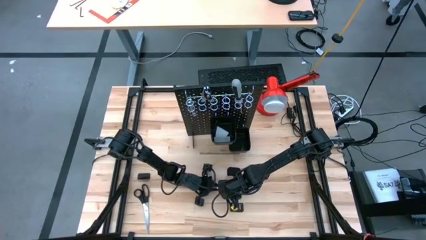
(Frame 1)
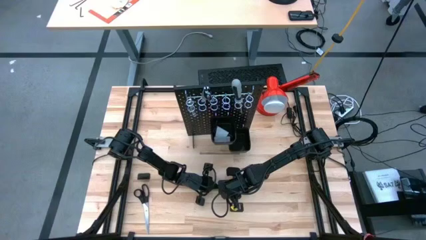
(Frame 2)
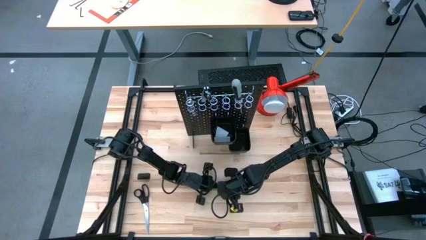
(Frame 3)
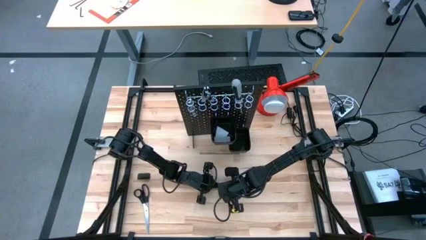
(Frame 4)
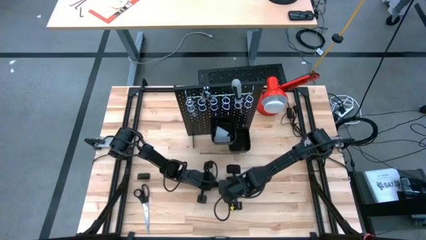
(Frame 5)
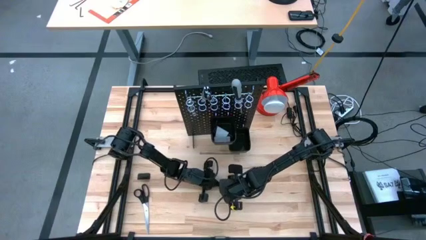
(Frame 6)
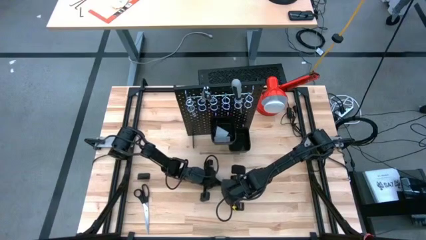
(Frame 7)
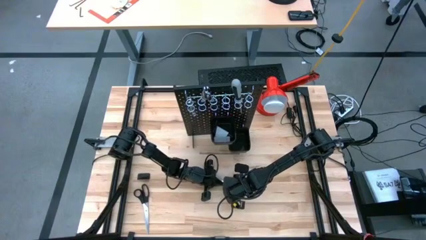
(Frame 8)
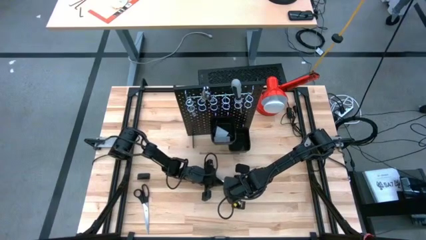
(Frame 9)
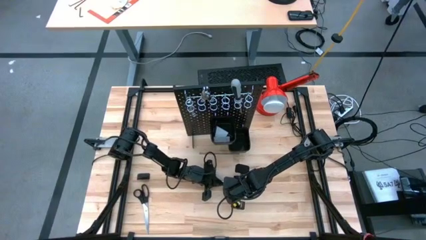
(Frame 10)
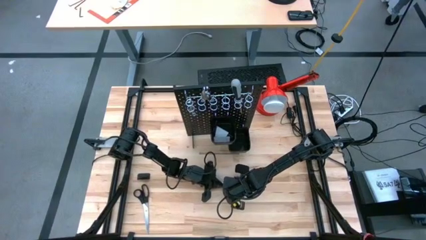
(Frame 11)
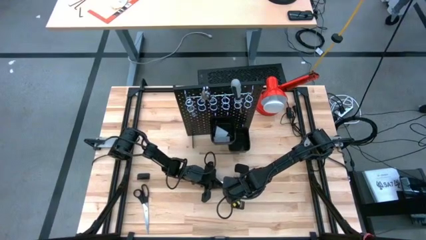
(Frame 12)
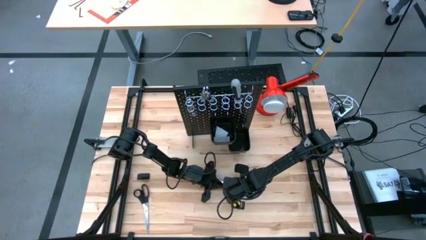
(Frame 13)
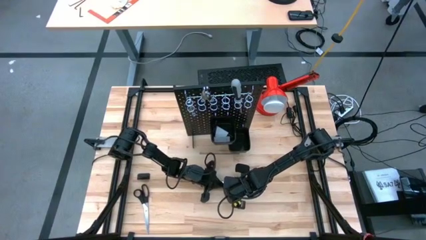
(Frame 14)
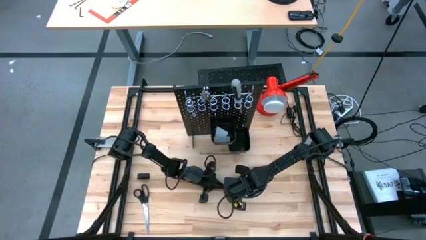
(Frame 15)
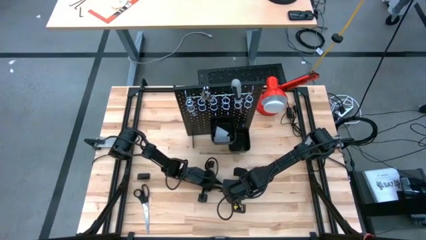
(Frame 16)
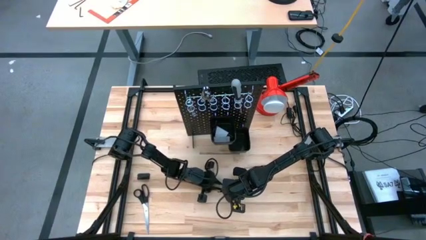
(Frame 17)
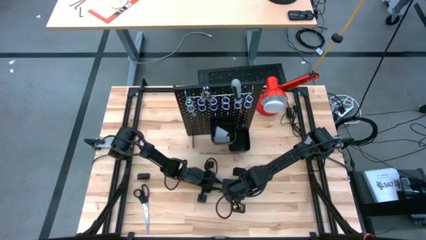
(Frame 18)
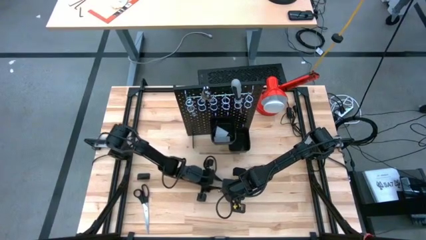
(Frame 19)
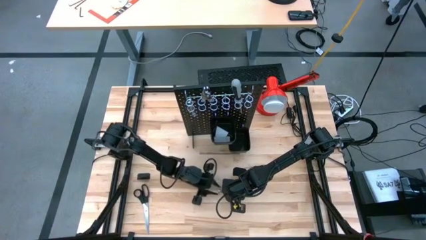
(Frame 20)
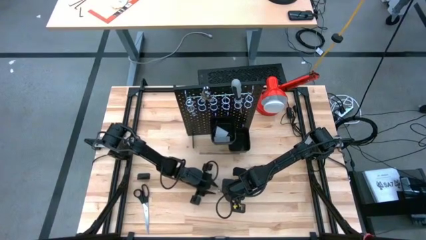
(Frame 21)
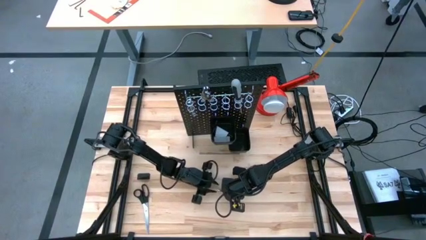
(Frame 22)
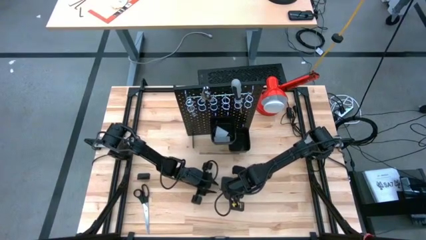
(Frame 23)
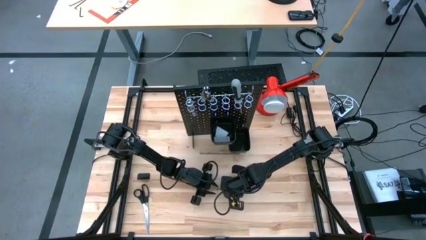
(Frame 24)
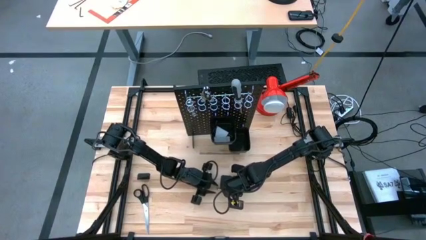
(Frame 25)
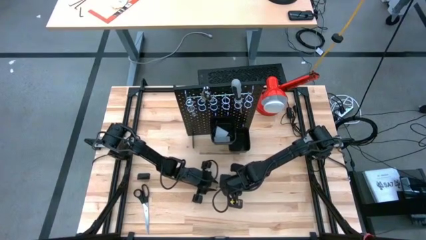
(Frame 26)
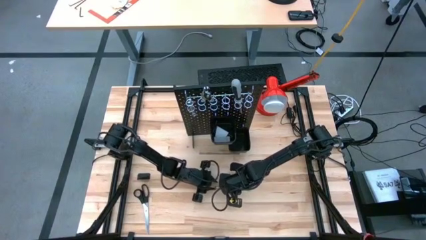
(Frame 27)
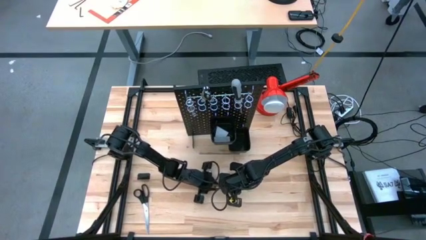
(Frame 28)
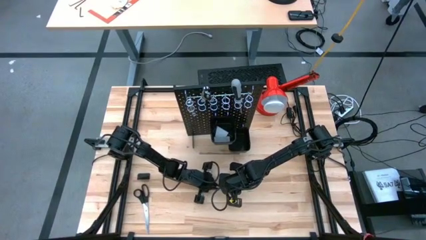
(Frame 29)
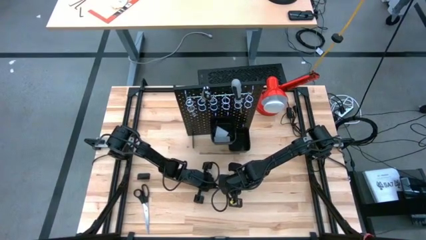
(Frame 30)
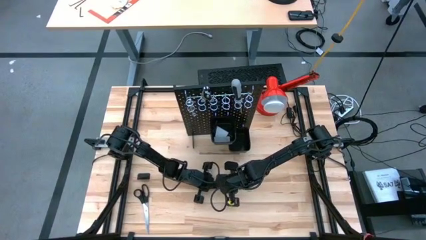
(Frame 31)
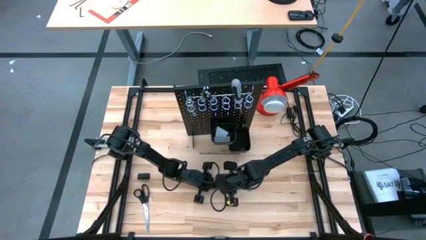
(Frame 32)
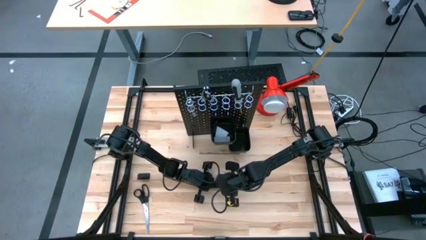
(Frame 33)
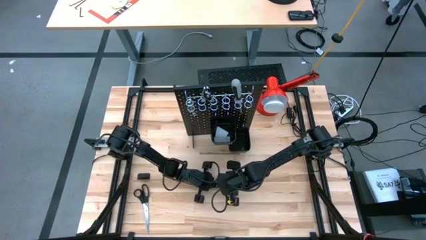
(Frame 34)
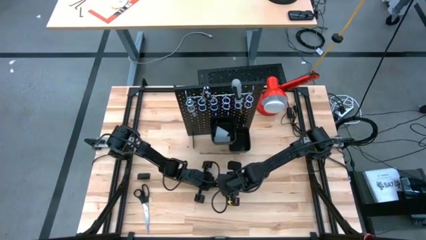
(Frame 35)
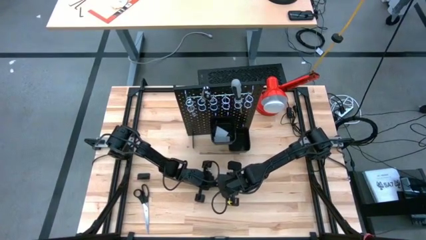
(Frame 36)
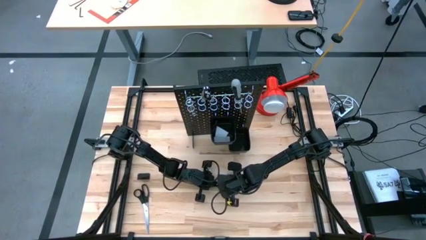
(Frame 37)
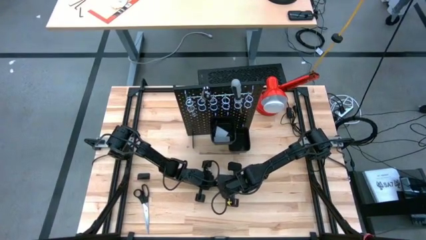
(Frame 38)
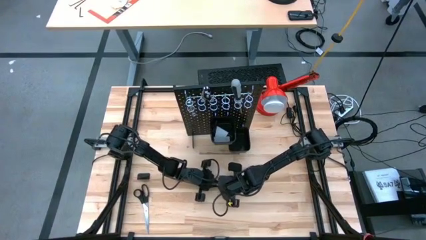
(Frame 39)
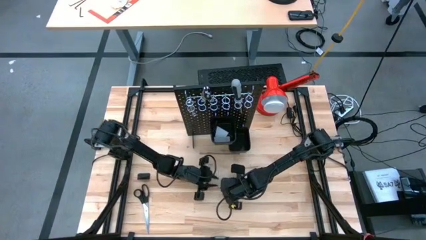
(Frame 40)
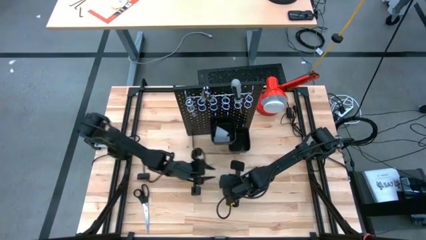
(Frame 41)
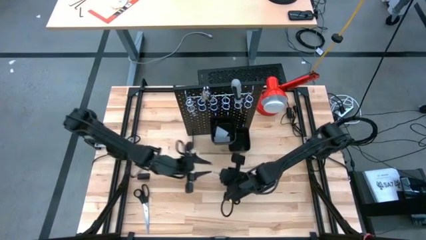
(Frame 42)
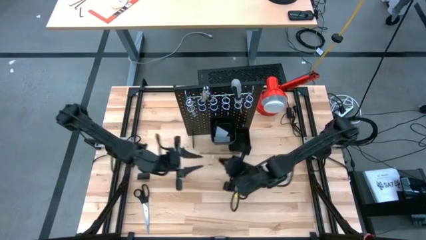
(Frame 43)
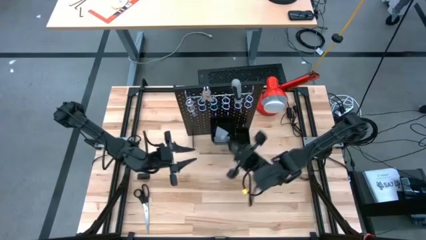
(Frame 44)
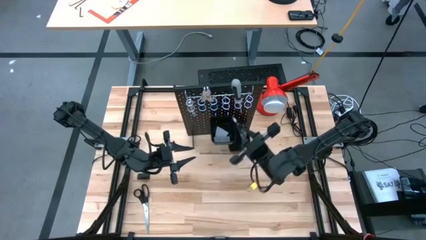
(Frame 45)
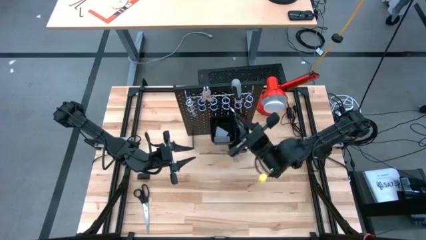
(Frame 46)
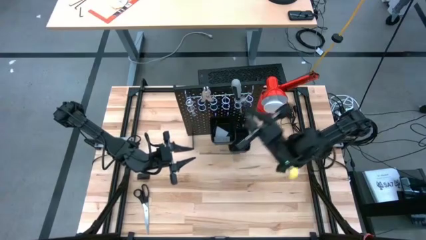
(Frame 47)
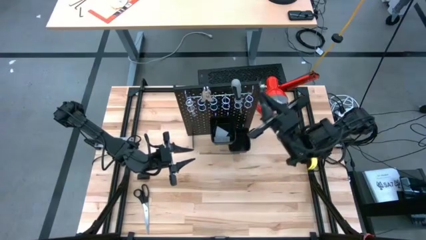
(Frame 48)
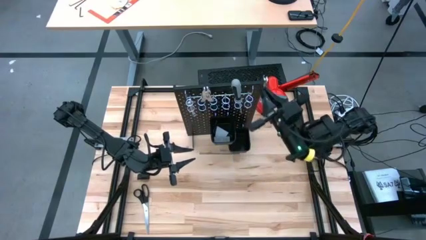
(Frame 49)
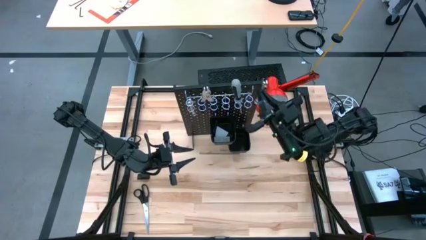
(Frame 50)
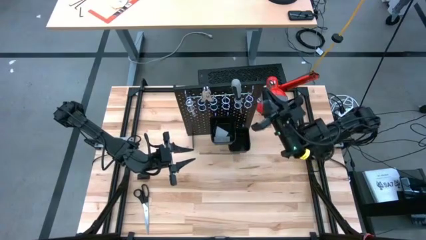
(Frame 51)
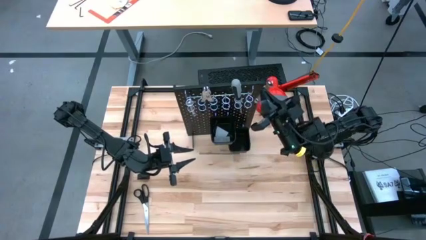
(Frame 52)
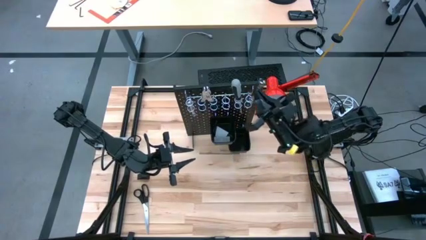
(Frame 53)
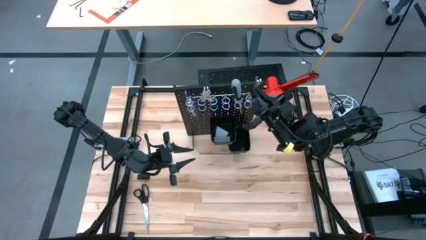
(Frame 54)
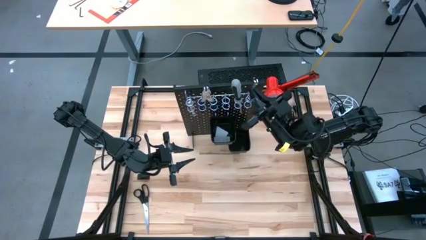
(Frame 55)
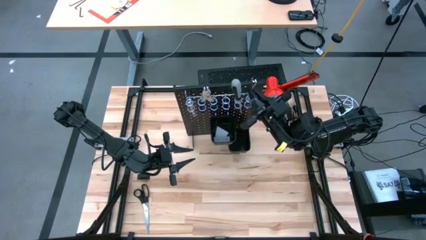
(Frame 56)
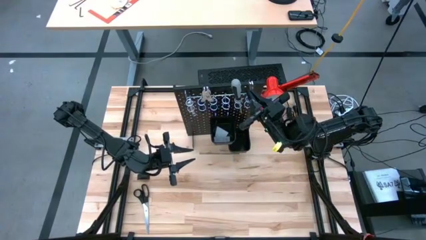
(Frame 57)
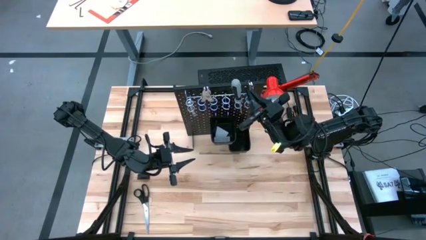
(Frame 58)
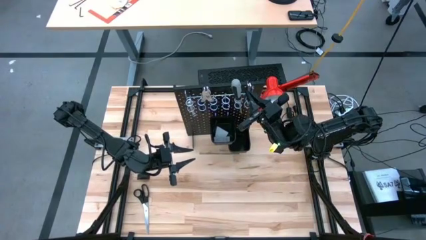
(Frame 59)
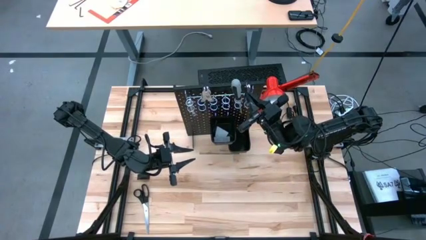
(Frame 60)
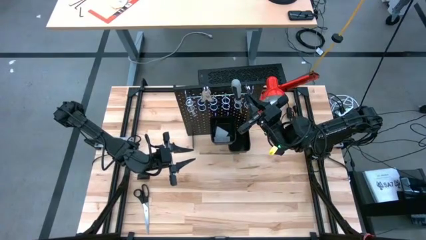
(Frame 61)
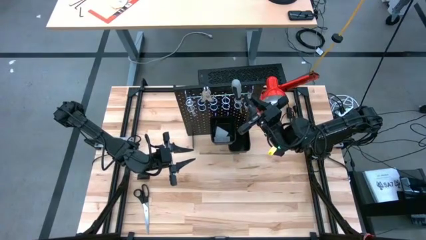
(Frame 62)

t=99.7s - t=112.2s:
Task: Hang tools onto peg board
Hang the wrench on the pegboard

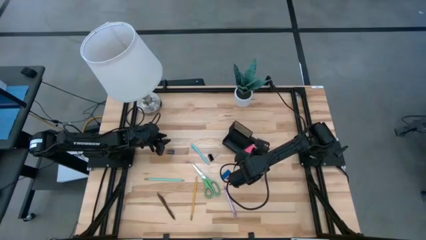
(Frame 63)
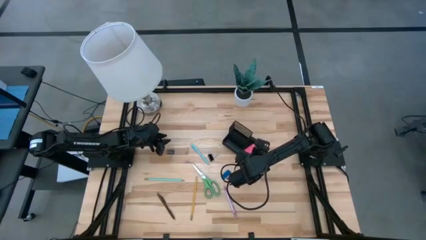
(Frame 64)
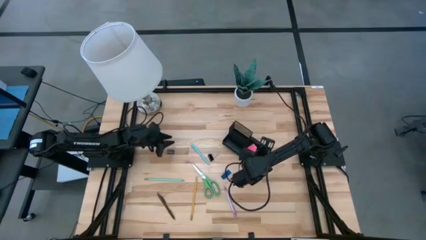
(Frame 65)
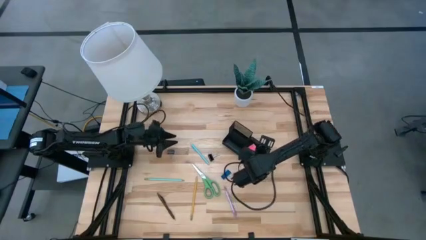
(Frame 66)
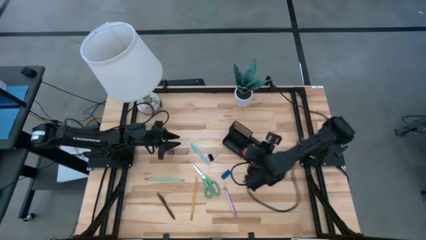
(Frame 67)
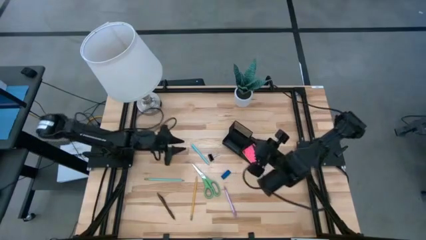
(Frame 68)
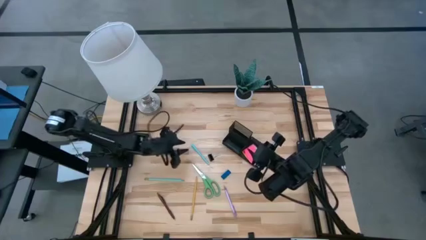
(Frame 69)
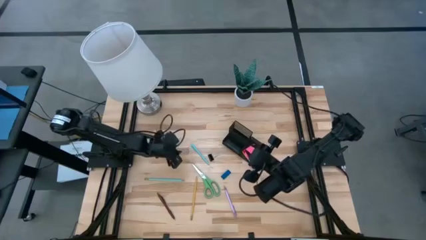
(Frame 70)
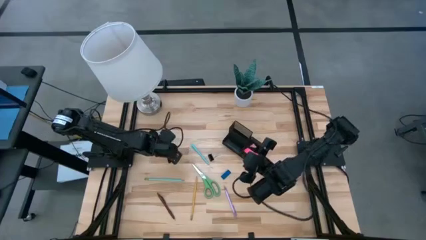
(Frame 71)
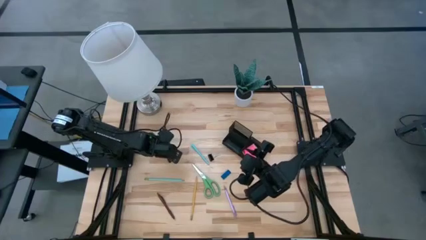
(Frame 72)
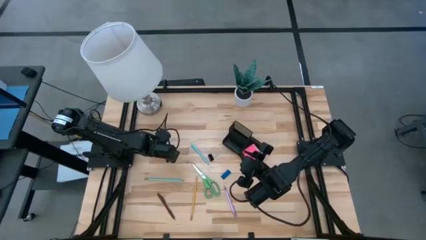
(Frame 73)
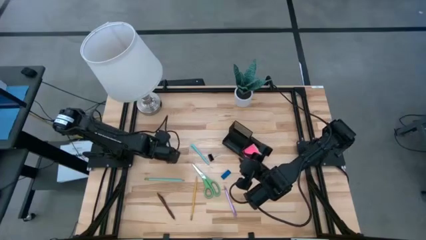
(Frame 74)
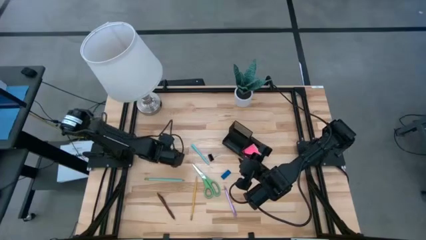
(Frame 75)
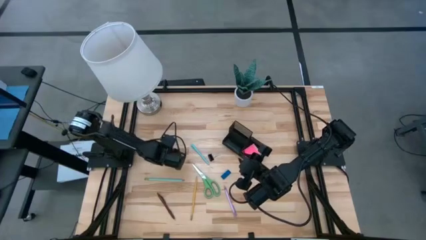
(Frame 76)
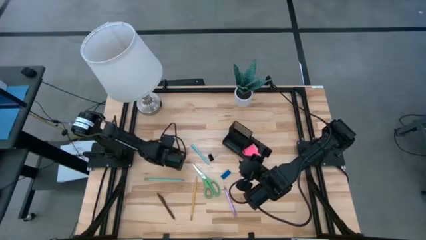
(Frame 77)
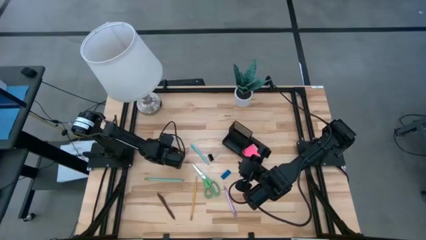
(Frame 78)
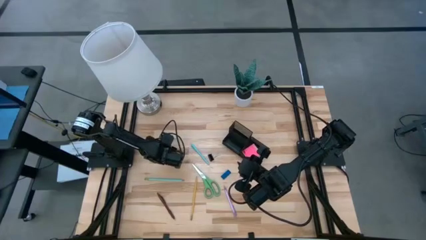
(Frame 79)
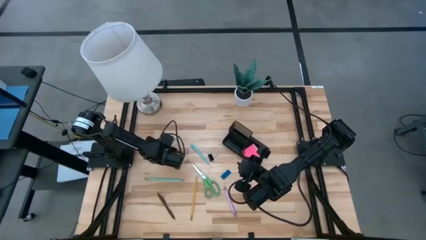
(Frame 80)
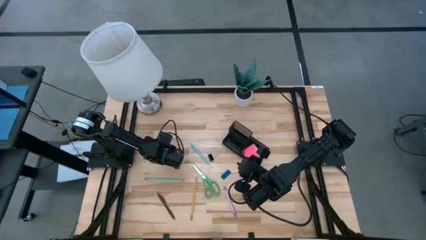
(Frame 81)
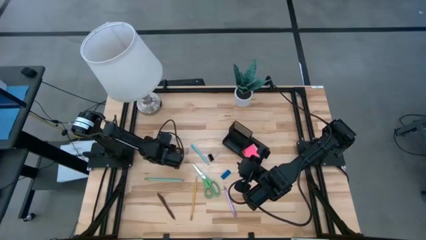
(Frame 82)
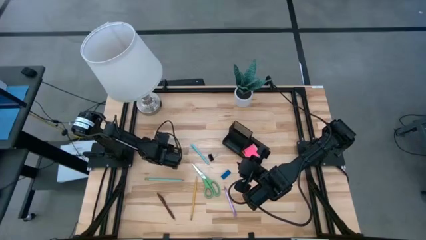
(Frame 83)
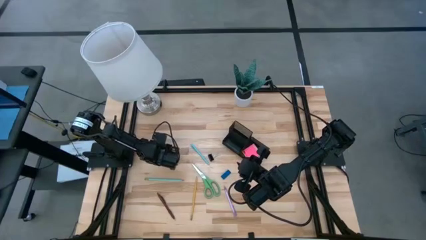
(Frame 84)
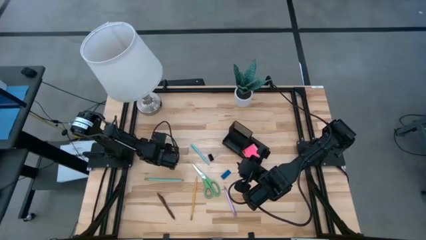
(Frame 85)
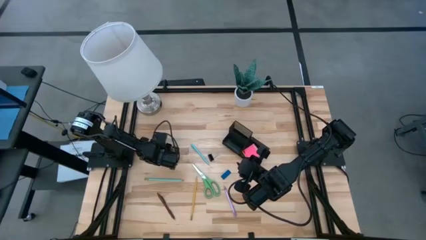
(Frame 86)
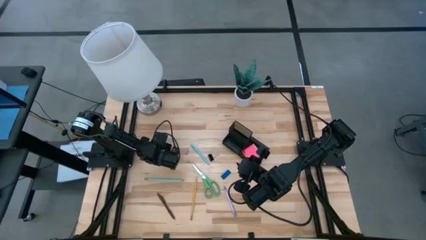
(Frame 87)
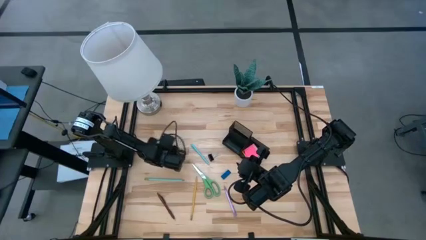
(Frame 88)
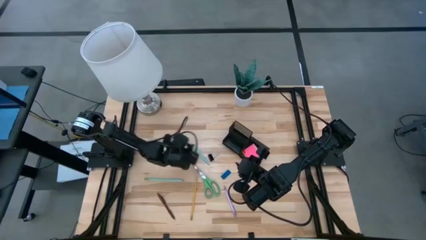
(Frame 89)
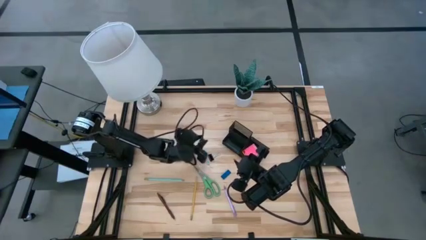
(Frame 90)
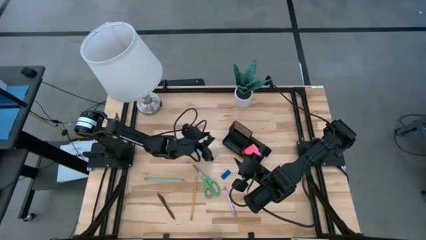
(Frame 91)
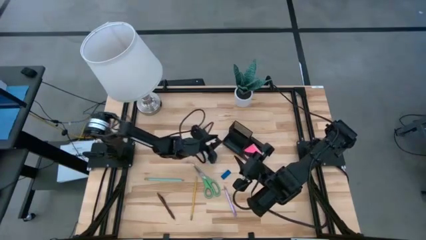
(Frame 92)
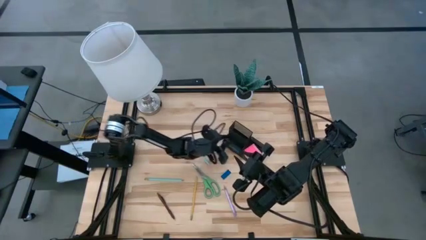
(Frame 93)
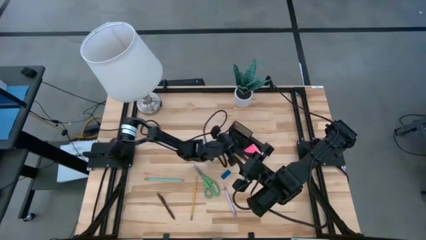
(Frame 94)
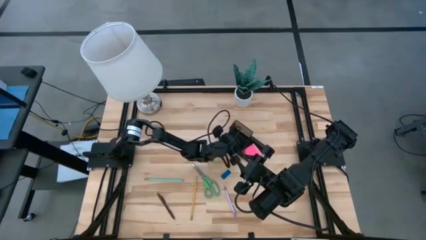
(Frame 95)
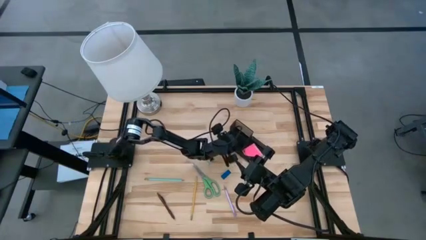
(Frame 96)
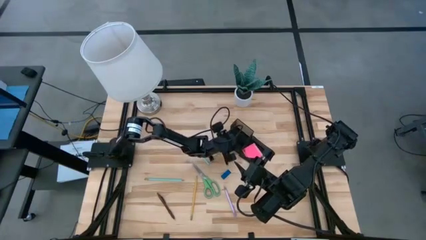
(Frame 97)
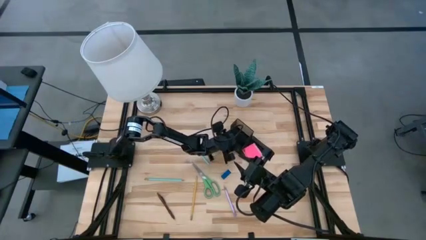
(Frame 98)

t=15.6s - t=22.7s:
Task: Pick and place office supplies into organizer
Put the left black binder clip into the desk organizer
